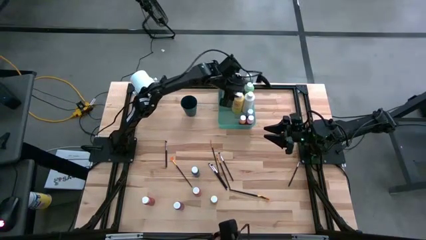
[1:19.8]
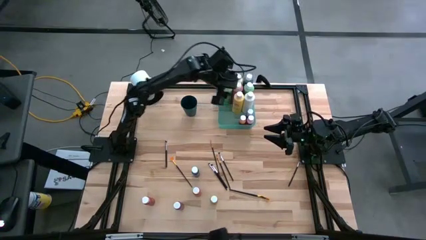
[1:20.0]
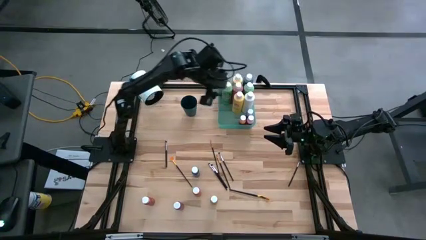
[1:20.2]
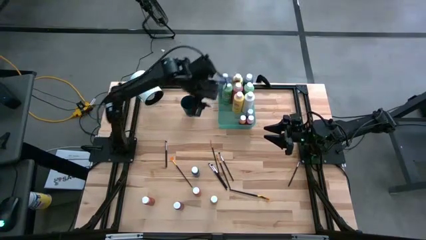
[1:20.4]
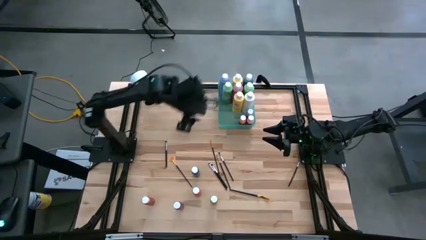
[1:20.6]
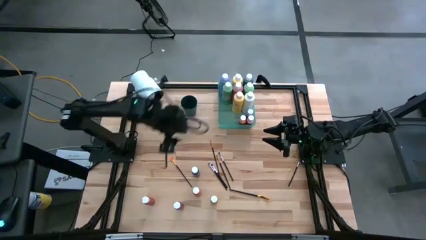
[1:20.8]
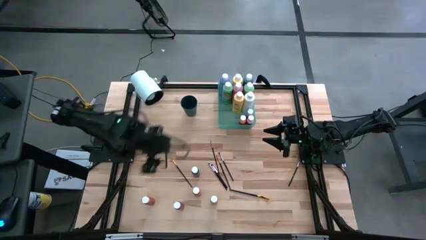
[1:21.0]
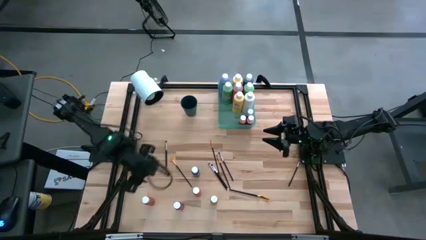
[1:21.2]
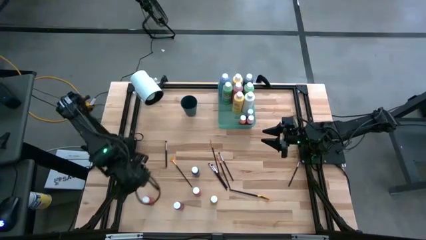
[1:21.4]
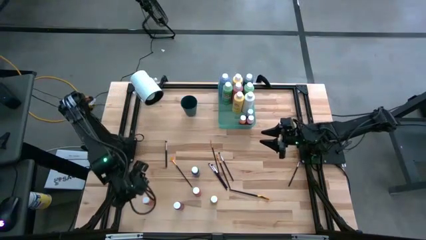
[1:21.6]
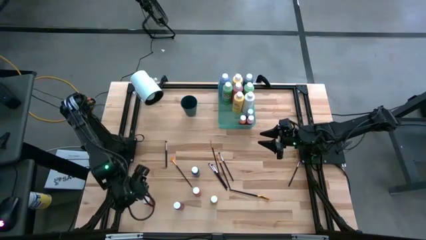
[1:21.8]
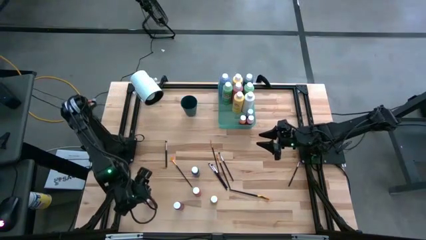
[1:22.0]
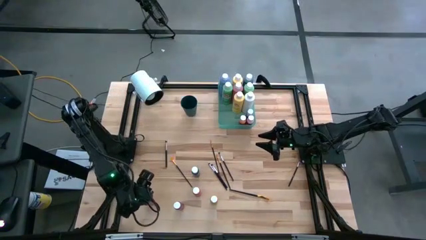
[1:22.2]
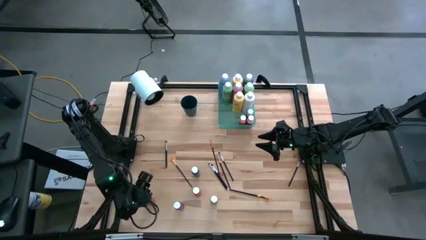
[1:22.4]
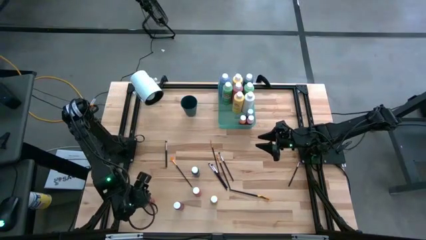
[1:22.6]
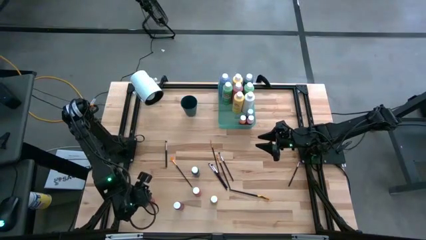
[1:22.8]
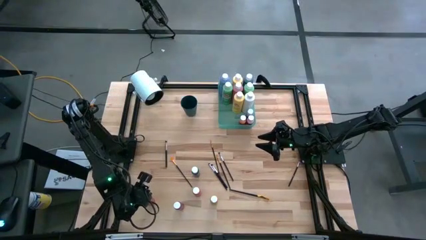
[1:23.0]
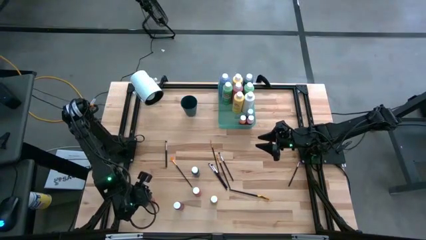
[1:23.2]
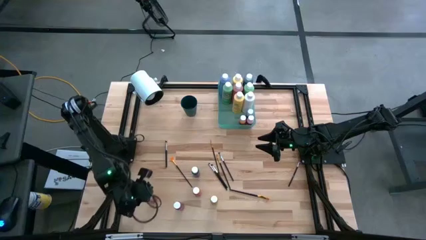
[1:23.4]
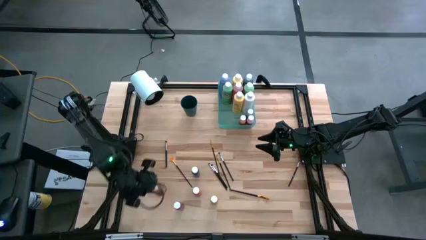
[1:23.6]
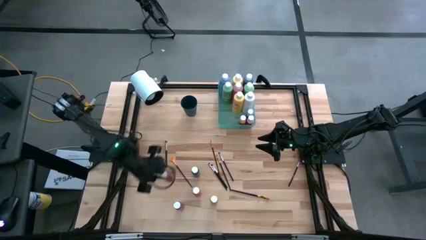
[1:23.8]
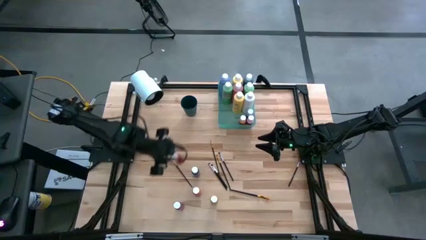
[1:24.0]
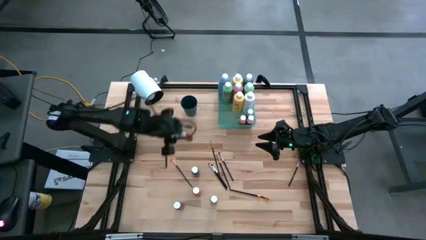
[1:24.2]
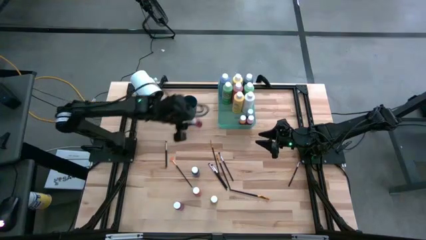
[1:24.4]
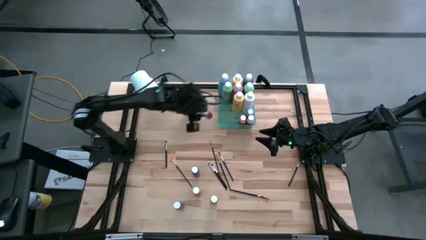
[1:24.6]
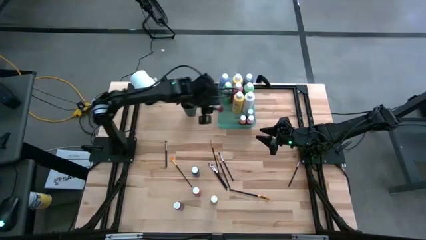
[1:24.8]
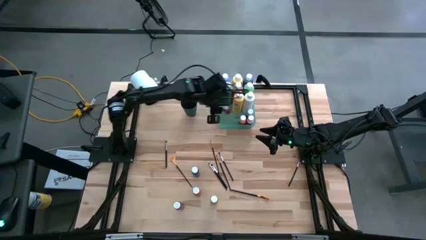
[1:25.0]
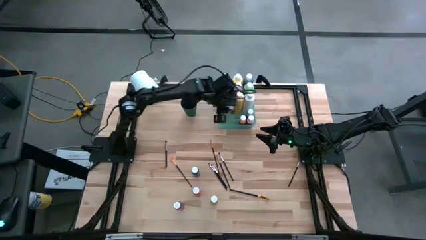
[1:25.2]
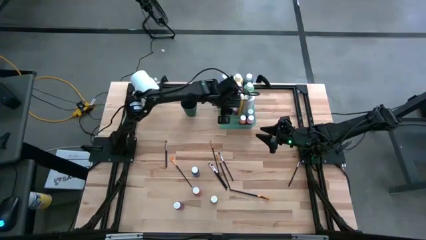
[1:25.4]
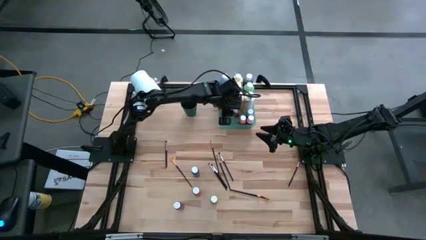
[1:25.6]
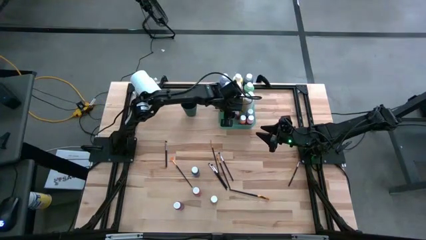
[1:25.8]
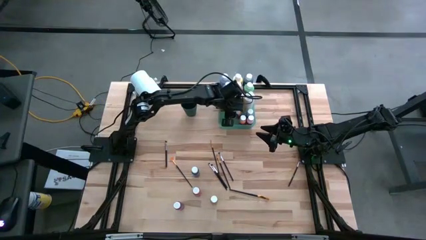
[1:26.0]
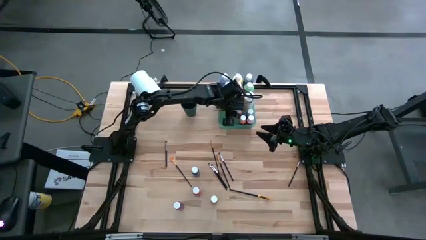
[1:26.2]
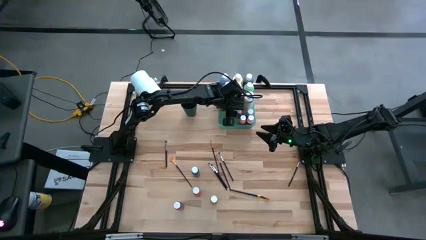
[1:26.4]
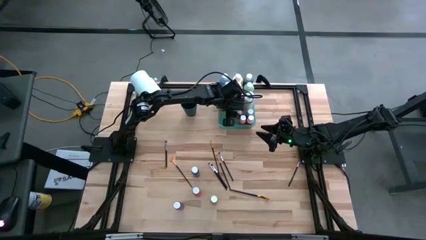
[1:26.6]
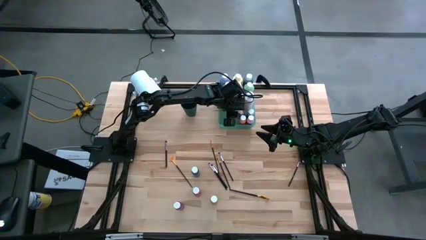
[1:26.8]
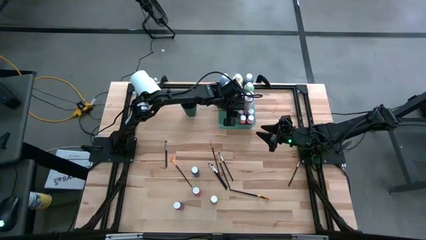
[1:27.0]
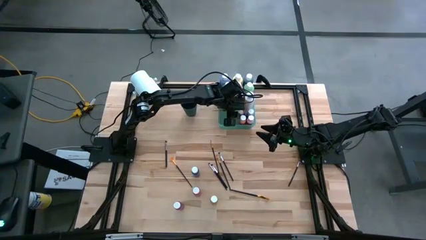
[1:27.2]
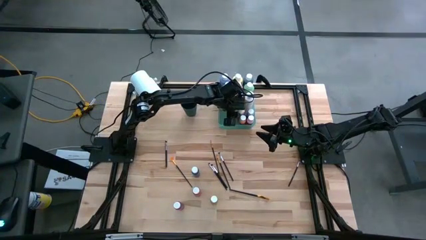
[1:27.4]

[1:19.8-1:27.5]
Task: Pick & Place Paint Supplies
Put the red small paint bottle into the green bin

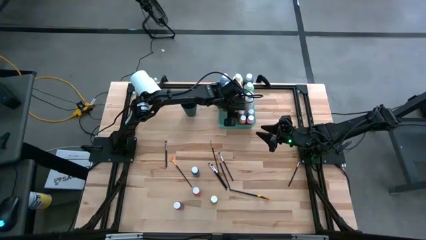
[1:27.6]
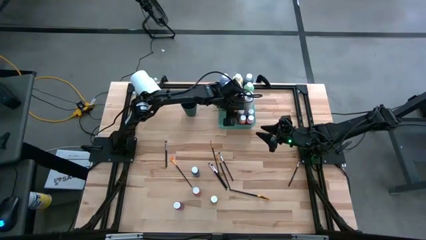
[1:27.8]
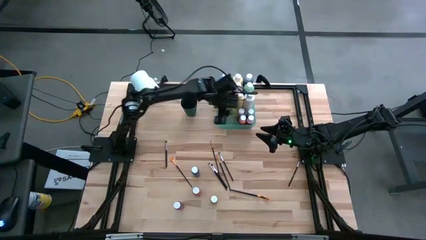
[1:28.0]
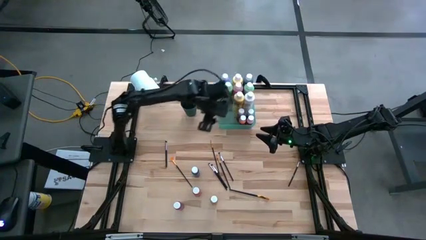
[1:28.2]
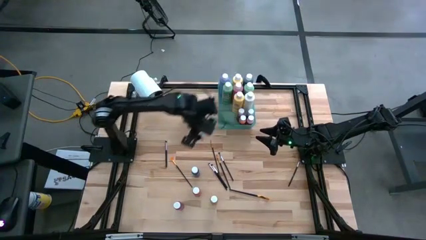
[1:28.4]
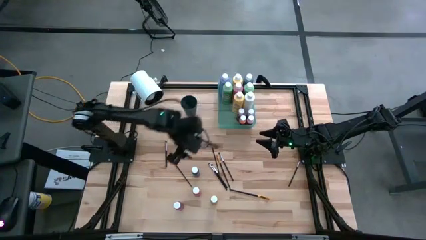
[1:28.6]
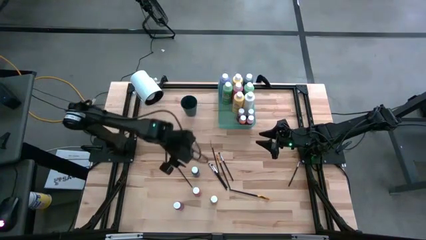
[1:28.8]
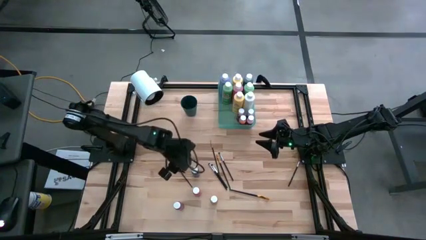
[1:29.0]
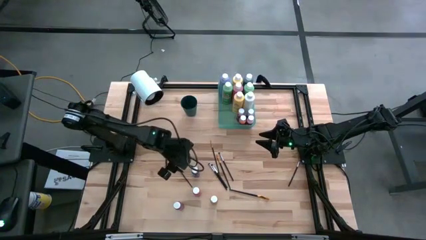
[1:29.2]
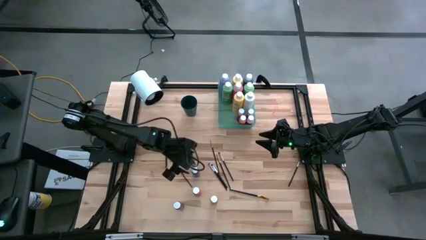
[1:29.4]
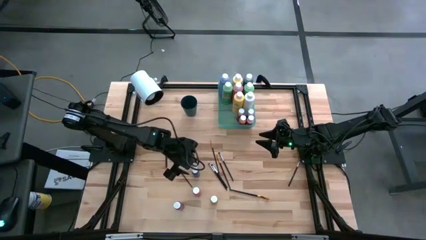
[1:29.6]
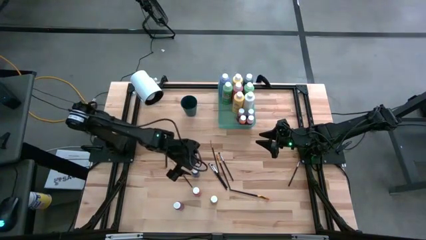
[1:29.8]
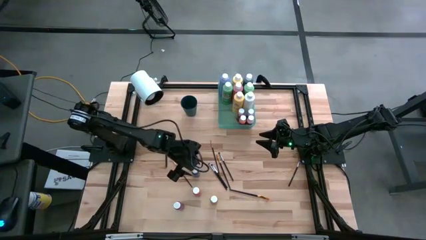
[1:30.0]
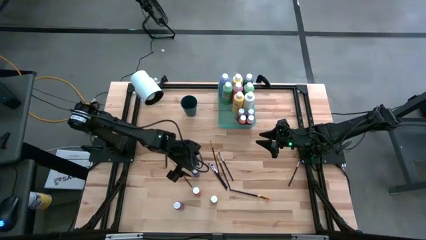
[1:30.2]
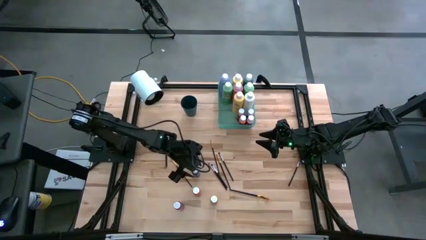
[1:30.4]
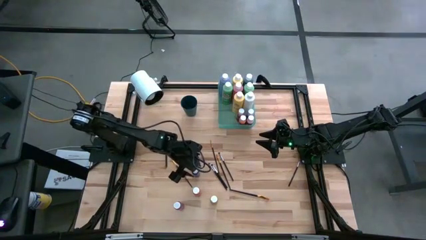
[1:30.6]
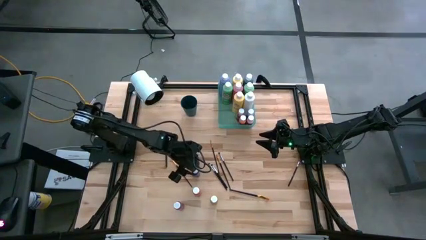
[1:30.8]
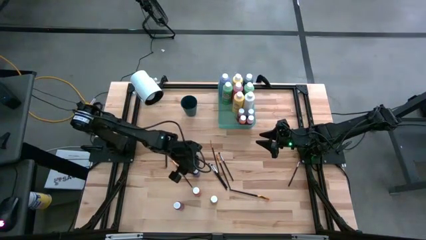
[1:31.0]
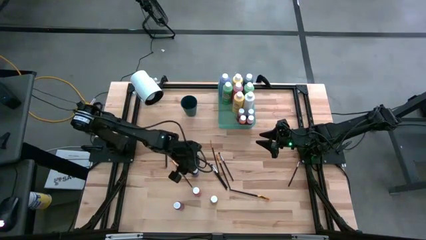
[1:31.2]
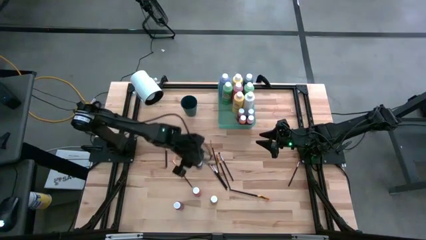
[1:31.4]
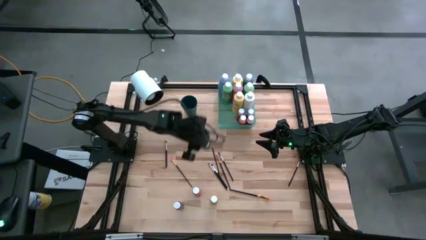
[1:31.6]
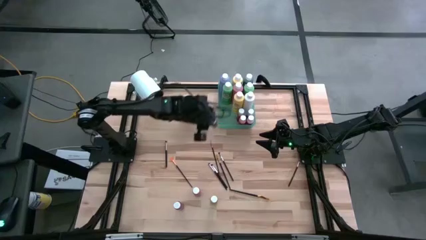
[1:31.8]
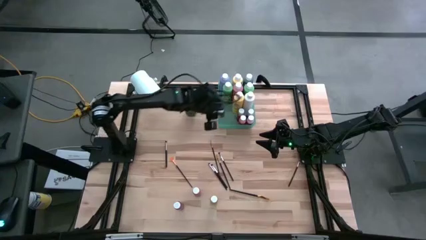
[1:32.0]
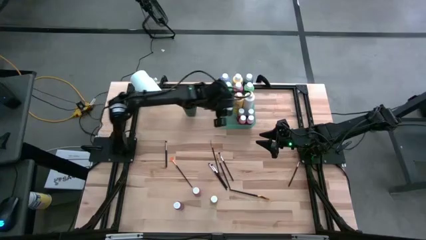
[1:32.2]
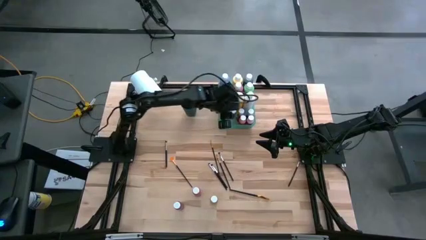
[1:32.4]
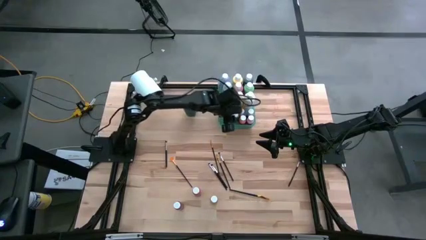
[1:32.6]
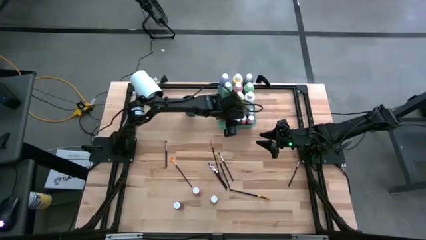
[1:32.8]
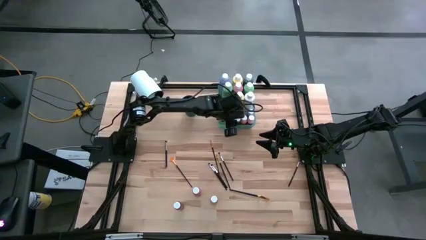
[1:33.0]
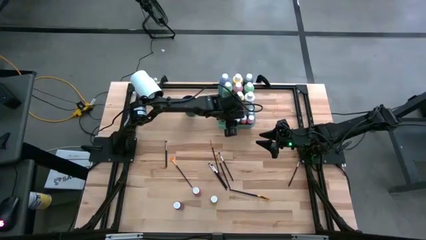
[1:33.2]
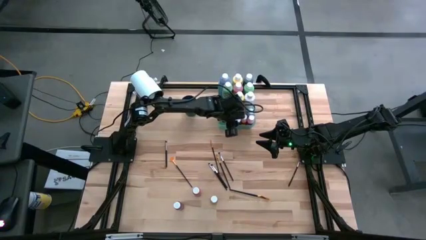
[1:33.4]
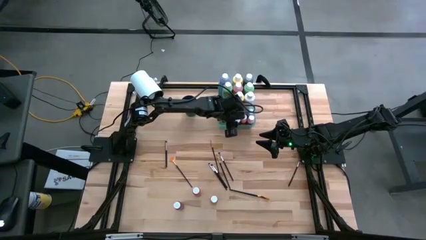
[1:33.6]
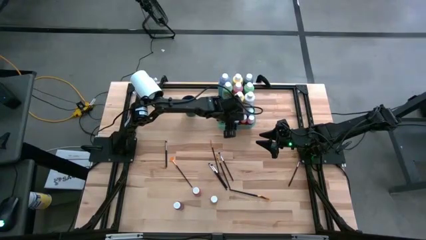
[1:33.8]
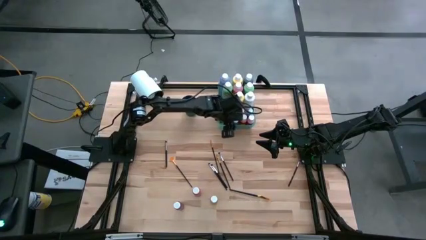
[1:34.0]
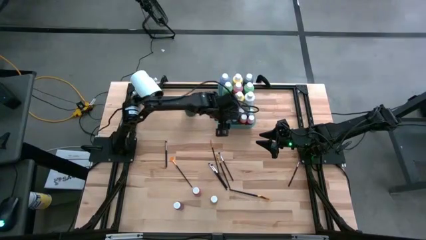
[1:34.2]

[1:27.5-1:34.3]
Put the blue small paint bottle into the green bin

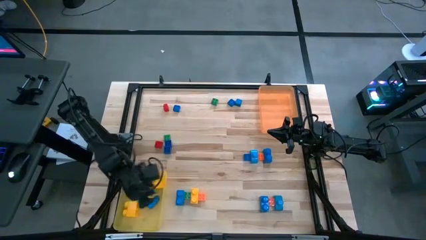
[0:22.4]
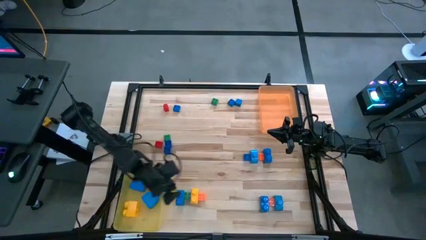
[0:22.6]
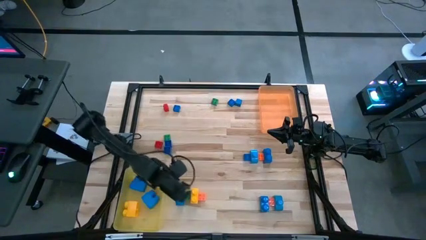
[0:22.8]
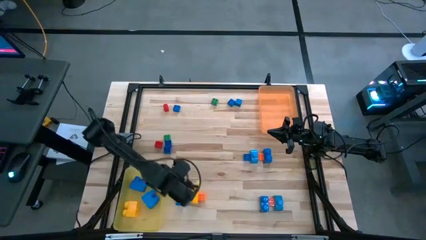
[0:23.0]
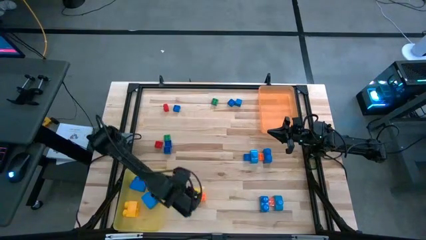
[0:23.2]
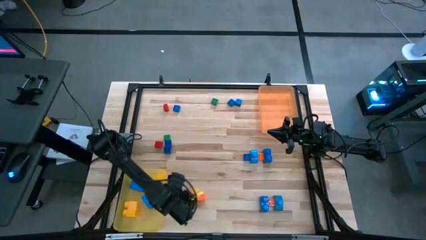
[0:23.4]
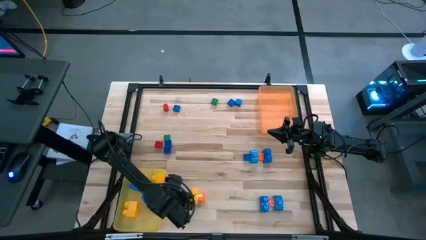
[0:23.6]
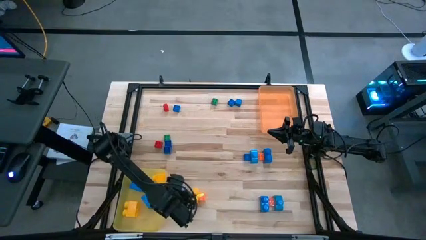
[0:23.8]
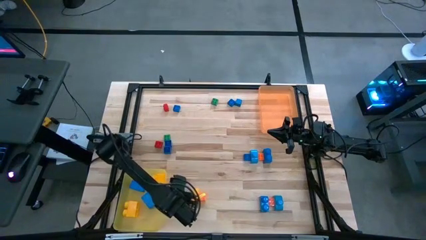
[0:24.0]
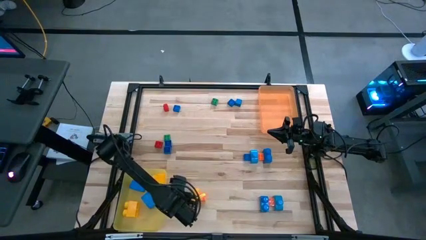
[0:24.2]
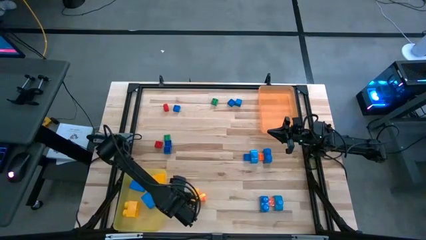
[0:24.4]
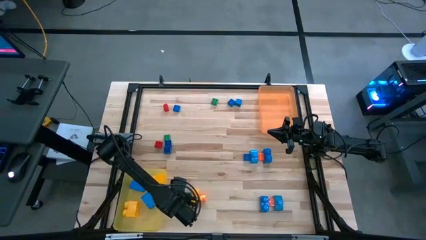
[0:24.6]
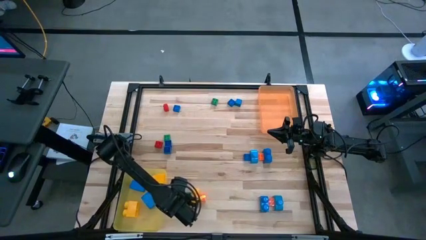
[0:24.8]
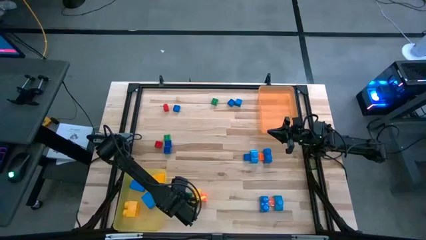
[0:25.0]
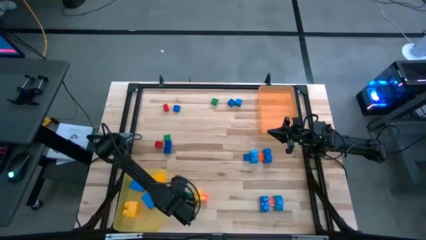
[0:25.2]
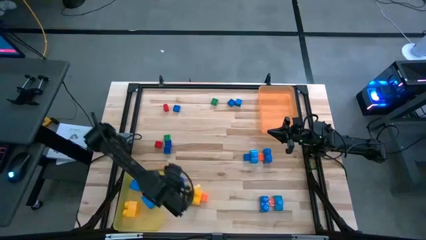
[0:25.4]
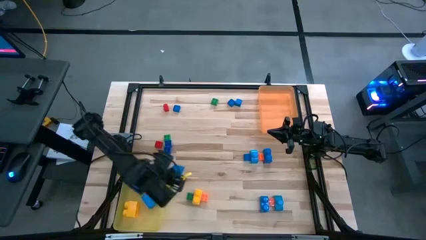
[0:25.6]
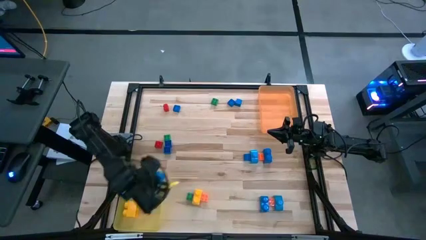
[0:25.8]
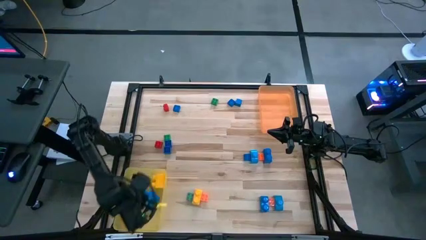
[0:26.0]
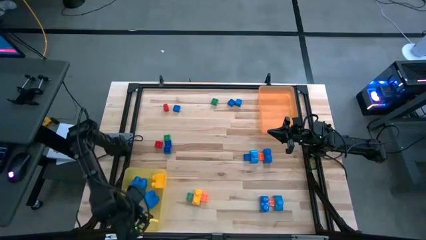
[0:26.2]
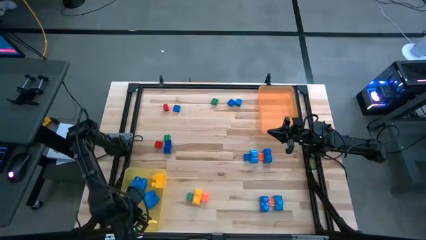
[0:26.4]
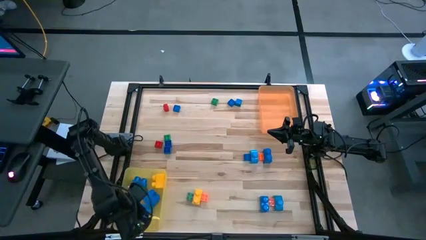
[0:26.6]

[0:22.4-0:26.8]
Task: Sort blocks by size
Put the large blue game piece into the yellow bin
